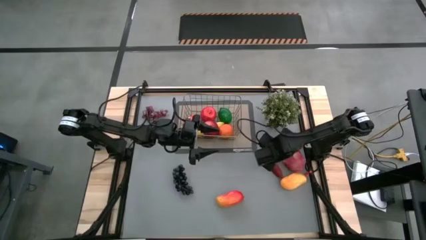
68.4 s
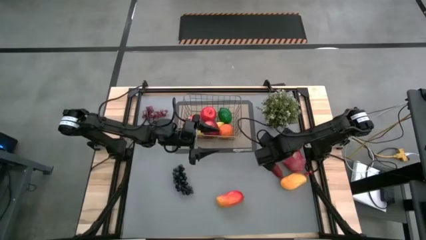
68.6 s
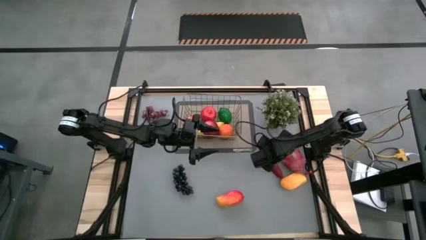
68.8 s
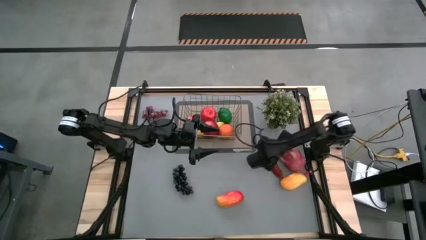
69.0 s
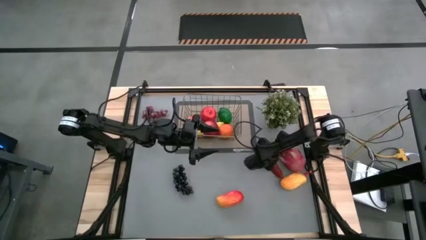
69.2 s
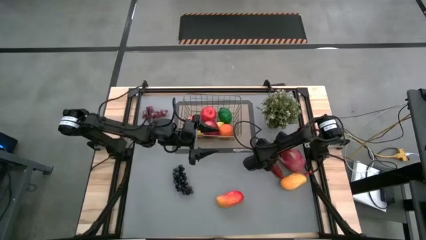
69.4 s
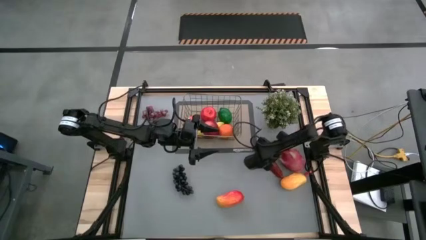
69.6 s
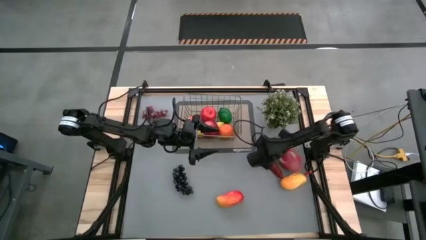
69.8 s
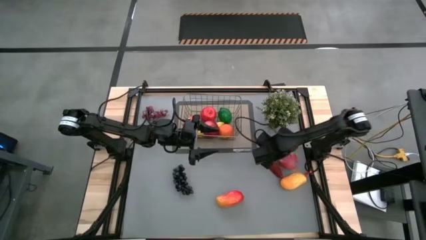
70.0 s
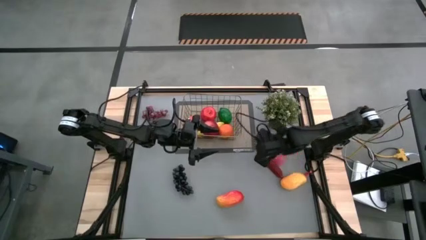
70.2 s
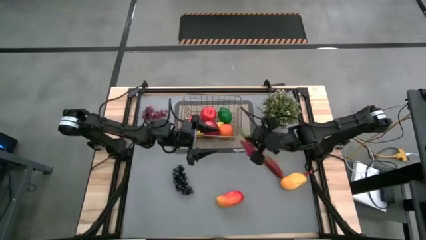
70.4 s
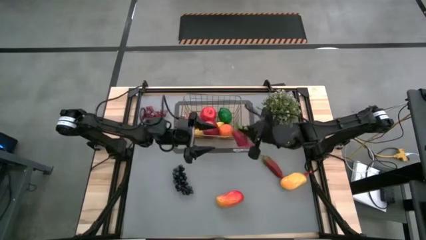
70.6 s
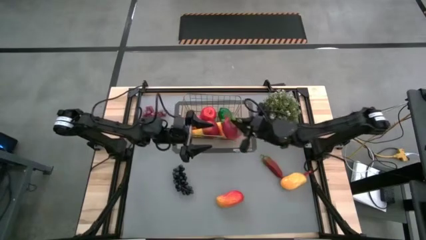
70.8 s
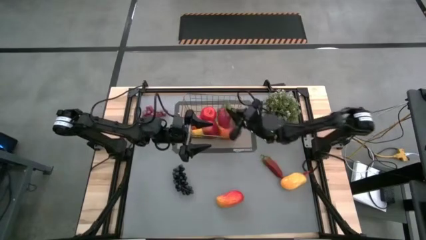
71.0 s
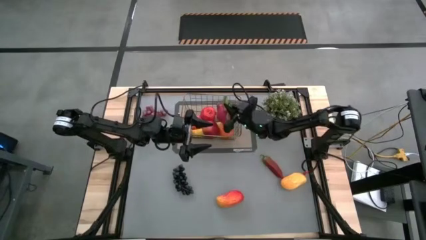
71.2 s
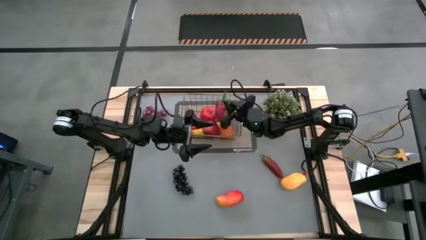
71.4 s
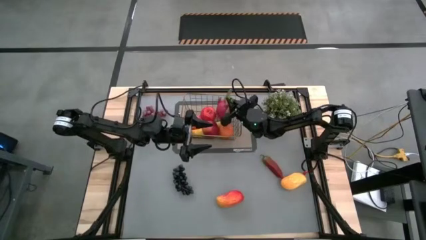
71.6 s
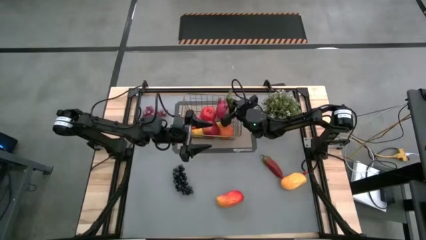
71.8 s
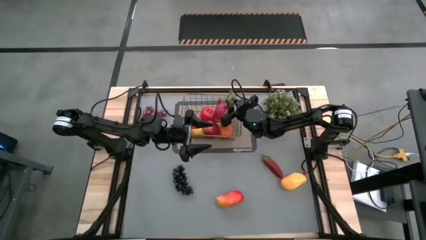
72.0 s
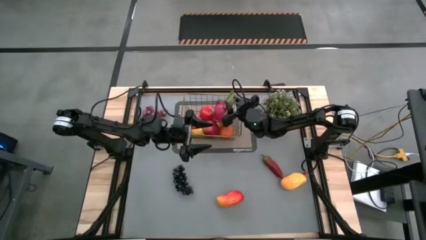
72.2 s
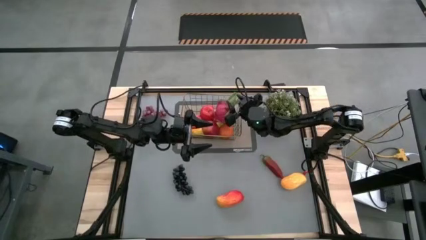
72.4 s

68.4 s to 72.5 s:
Task: Build produce basket
Put the dragonfruit into the black wire basket

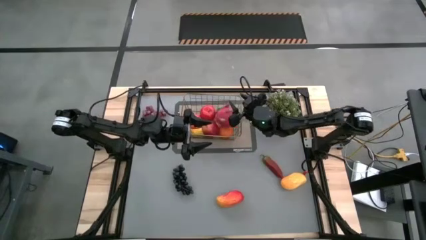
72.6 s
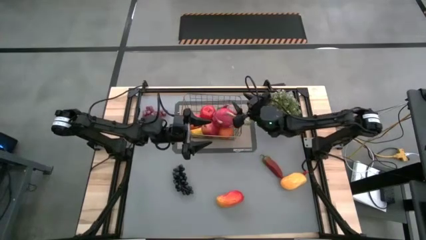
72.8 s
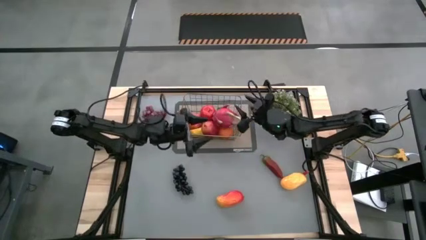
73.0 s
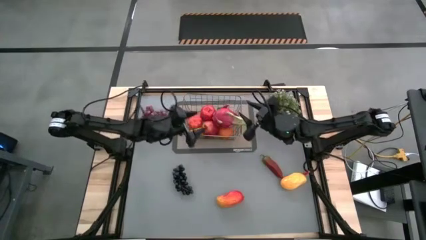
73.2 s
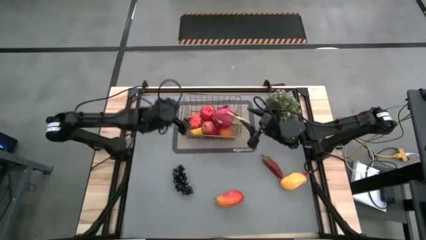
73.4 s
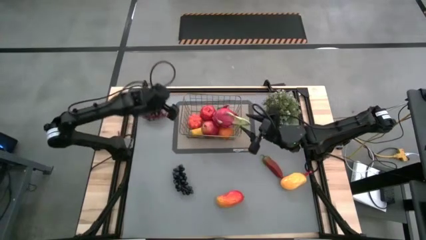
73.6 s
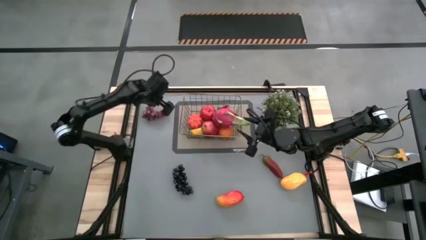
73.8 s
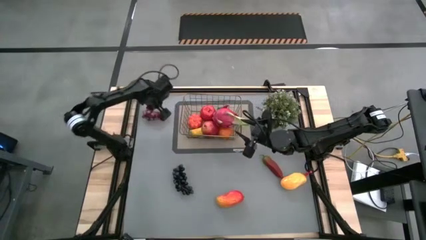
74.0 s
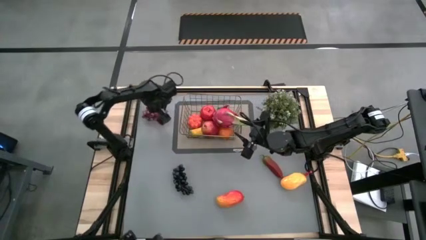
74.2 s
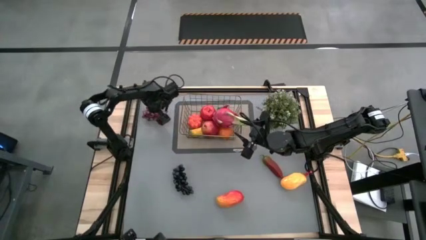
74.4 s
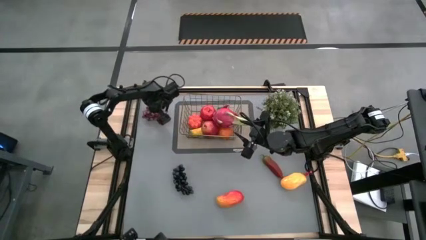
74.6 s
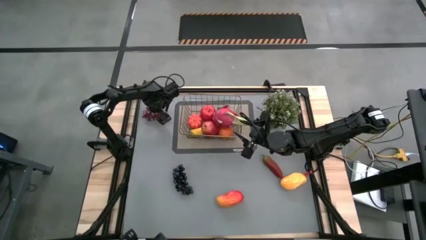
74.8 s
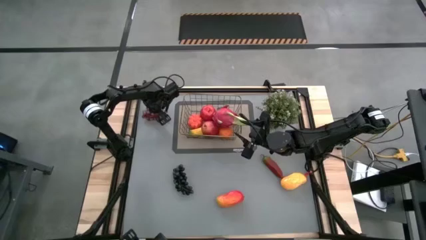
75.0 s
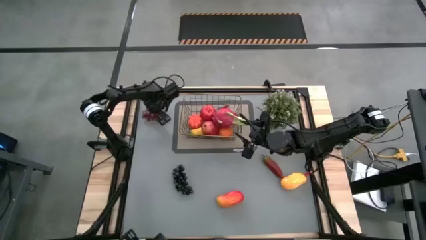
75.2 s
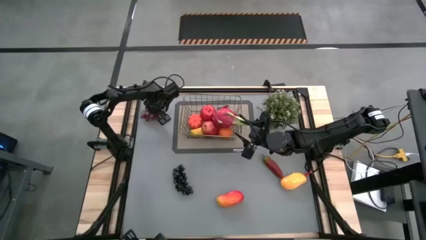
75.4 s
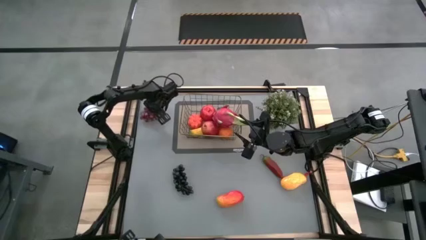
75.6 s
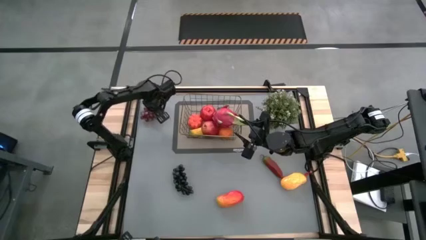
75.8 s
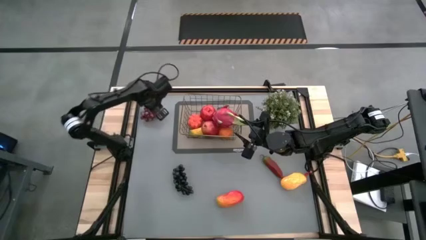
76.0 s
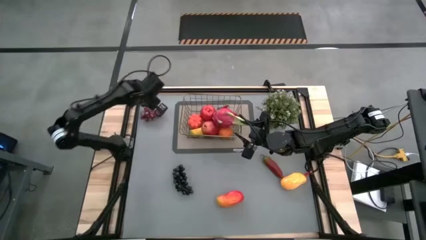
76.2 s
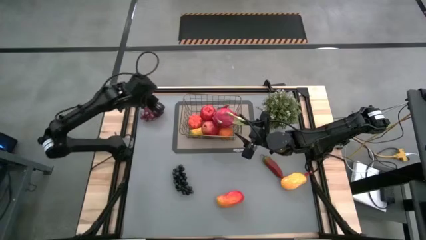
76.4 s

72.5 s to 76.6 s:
Put the red grapes into the wire basket

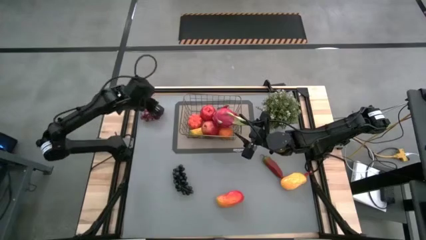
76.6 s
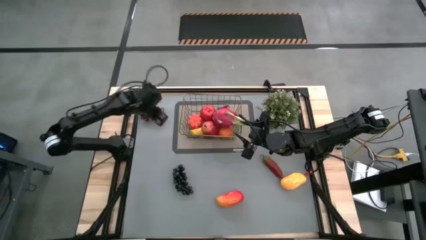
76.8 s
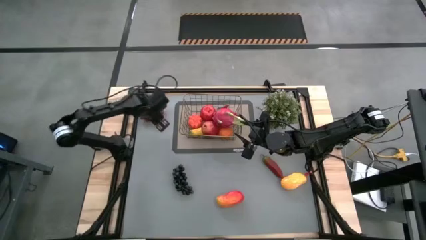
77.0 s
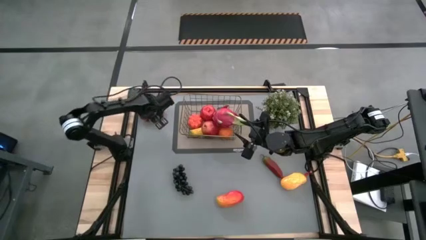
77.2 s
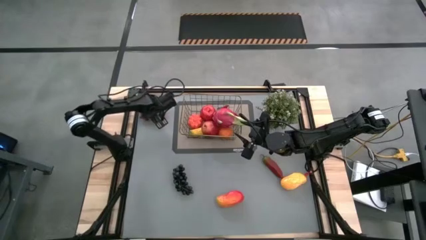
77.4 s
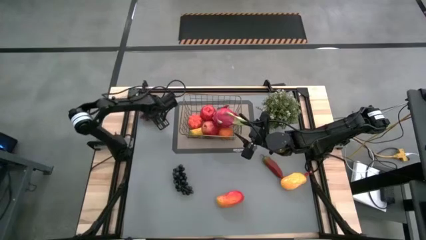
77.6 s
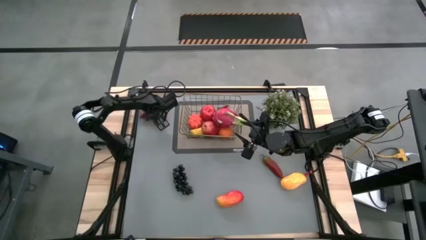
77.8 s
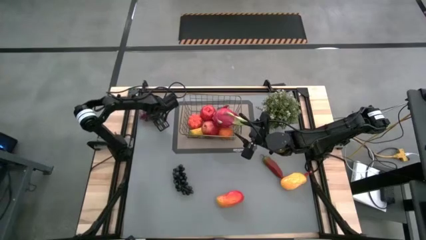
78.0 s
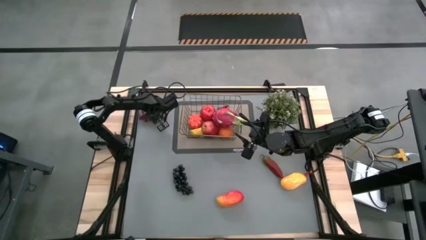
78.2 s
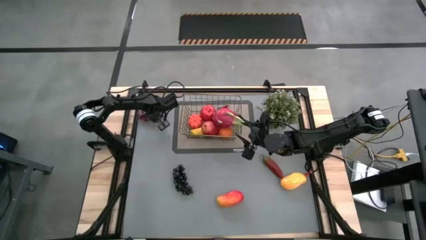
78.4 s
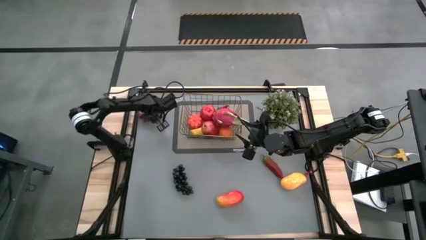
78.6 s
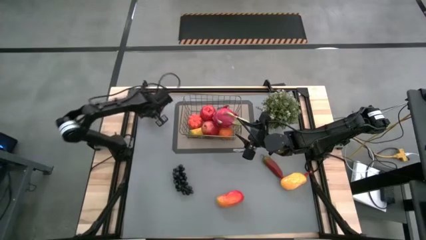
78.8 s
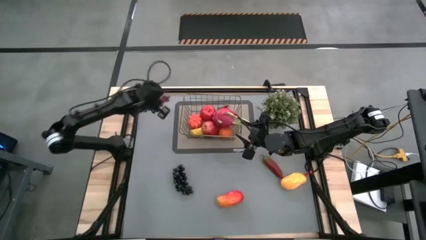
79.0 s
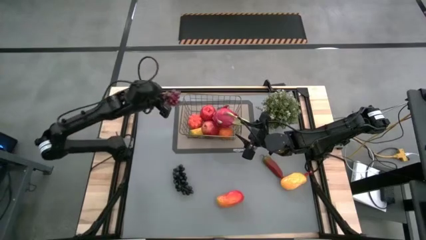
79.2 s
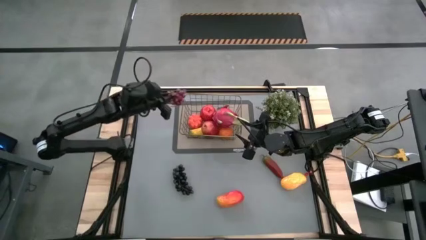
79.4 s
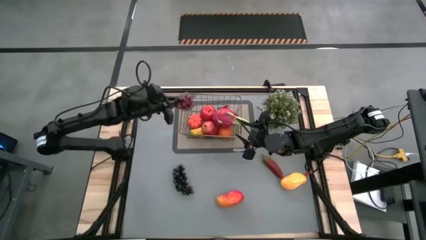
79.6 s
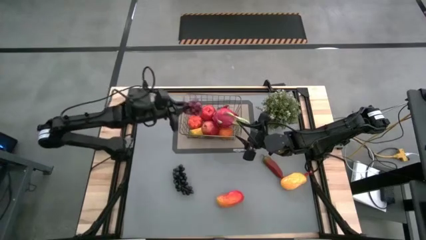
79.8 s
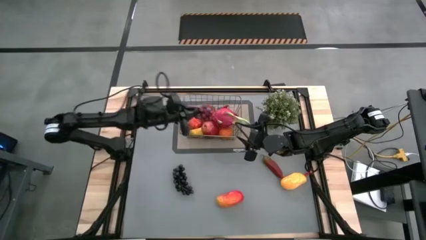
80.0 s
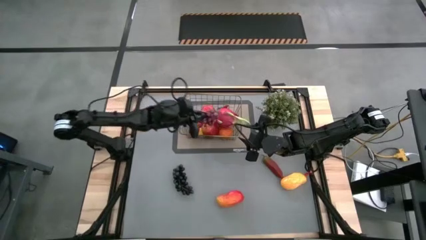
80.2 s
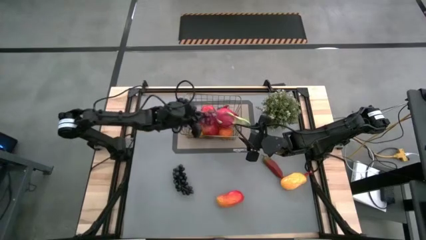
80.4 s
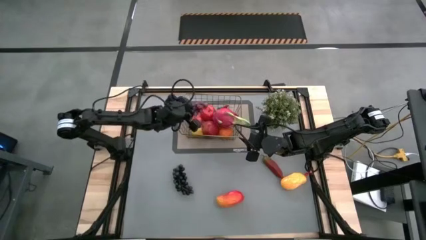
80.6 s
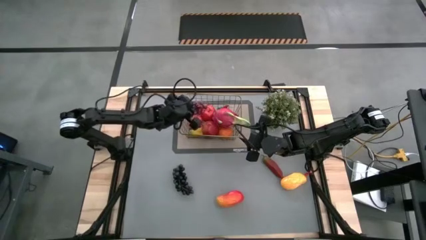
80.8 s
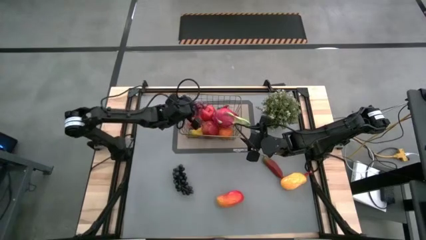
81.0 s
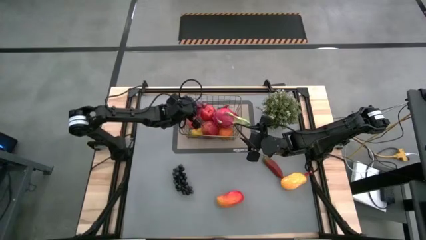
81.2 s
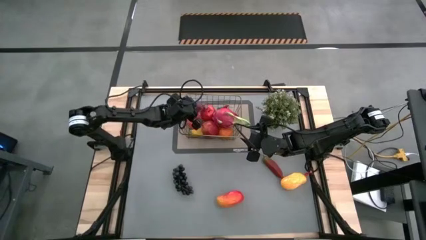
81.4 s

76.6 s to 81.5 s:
Put the red grapes into the wire basket
